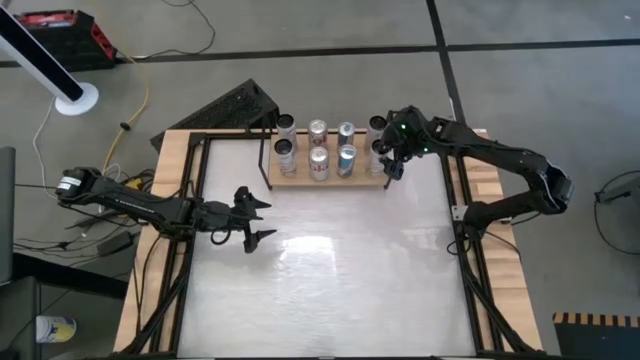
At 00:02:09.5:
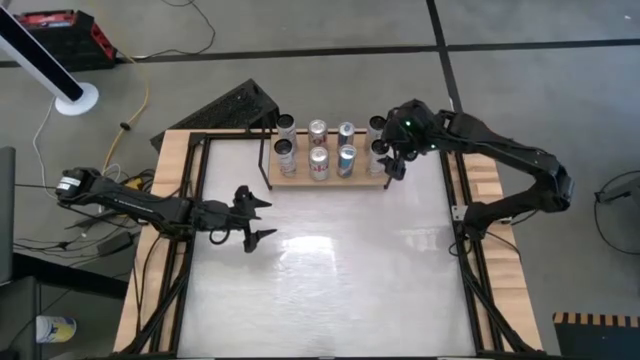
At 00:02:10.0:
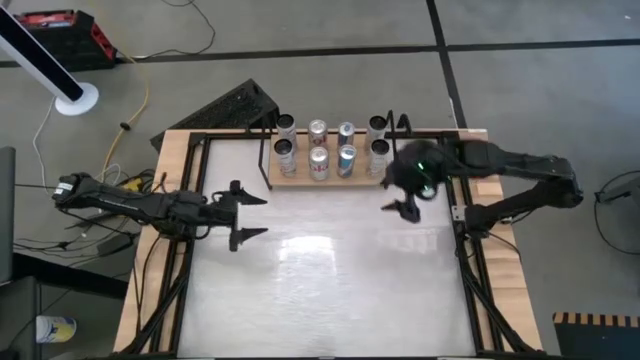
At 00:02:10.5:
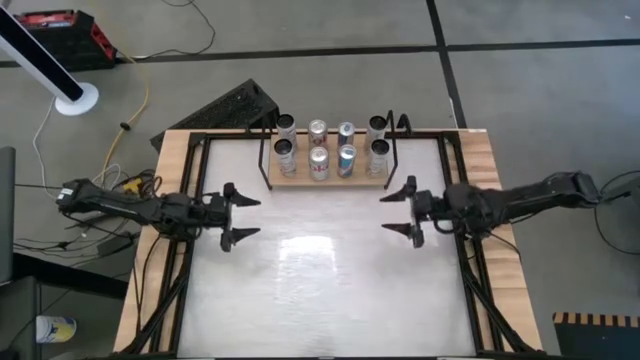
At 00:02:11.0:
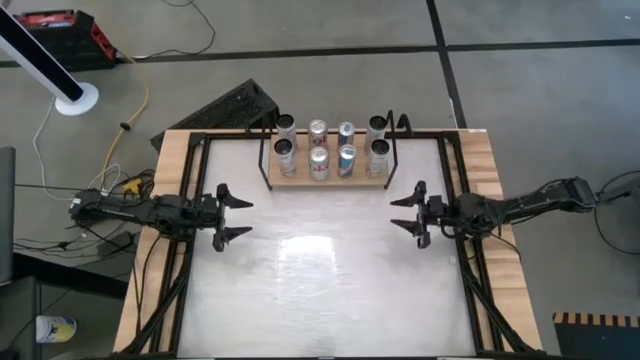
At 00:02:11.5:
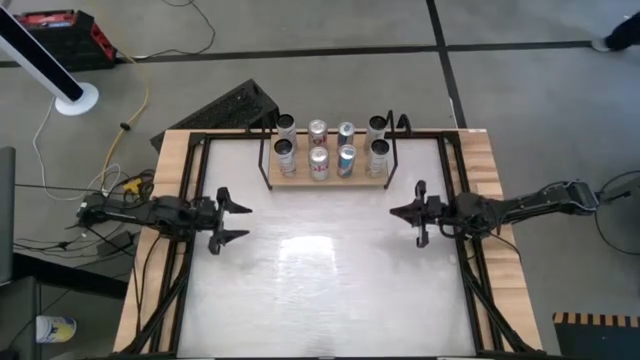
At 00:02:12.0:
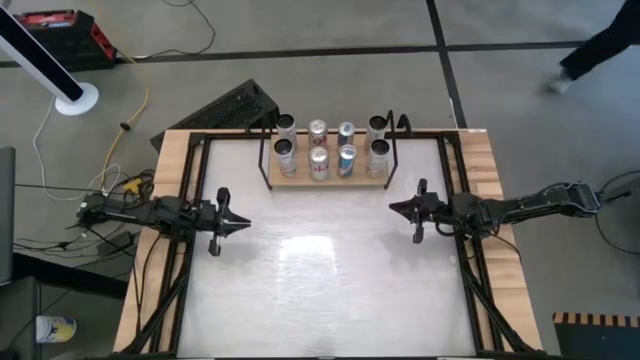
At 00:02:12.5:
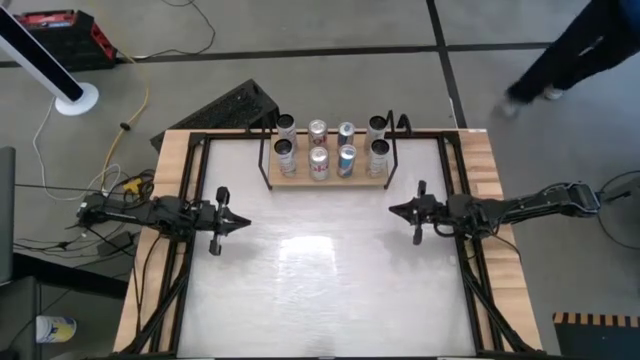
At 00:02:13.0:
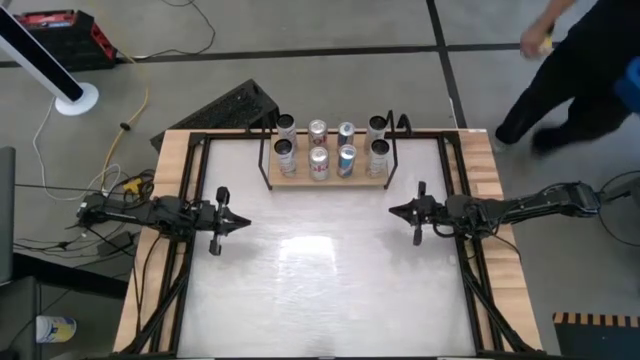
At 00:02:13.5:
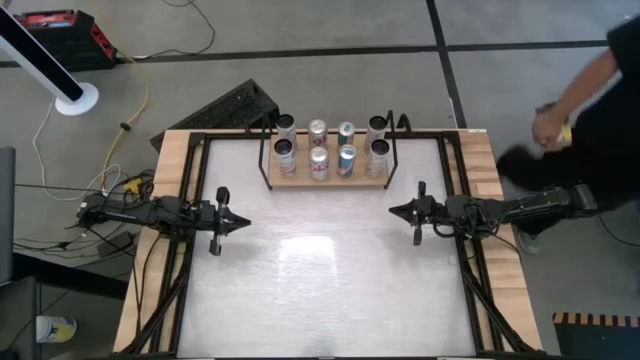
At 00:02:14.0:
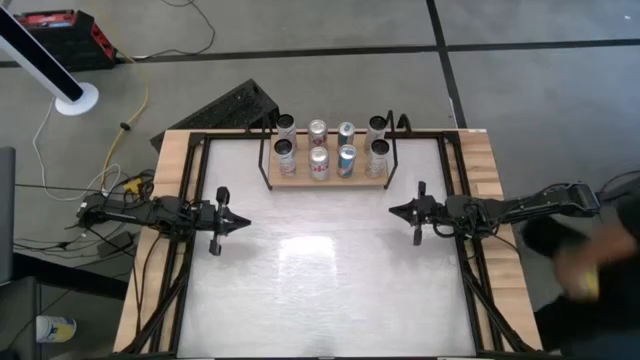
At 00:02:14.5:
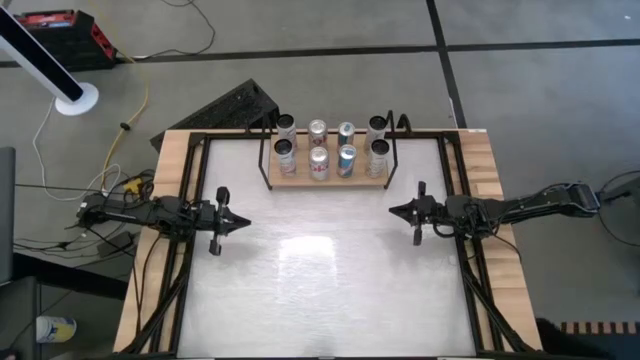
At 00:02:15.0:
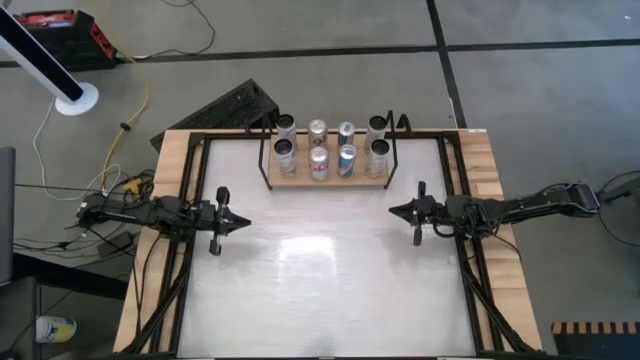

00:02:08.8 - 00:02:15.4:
Task: Place canned beverage on shelf
Return to Home Position

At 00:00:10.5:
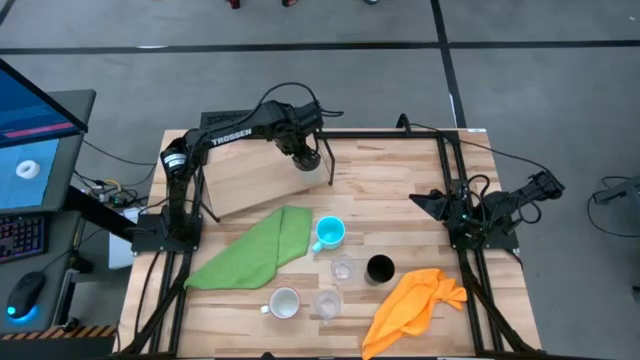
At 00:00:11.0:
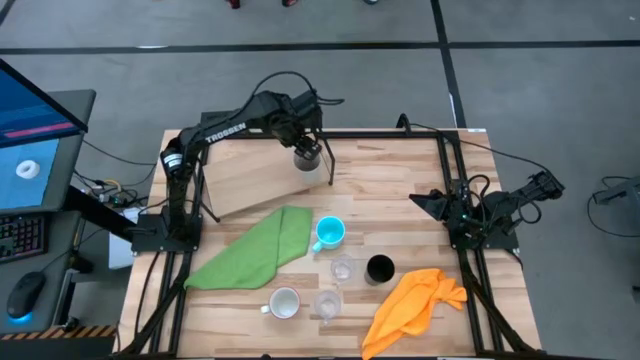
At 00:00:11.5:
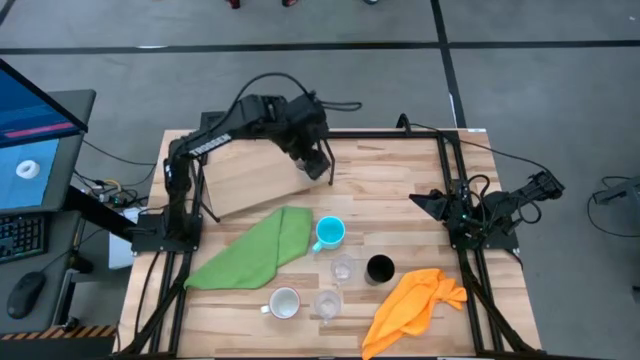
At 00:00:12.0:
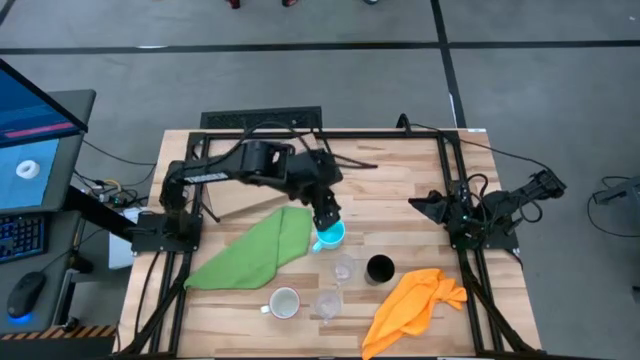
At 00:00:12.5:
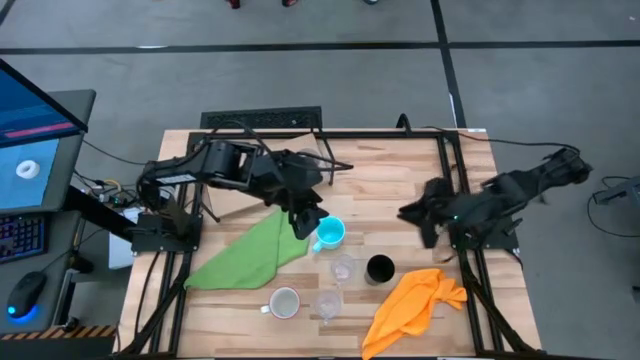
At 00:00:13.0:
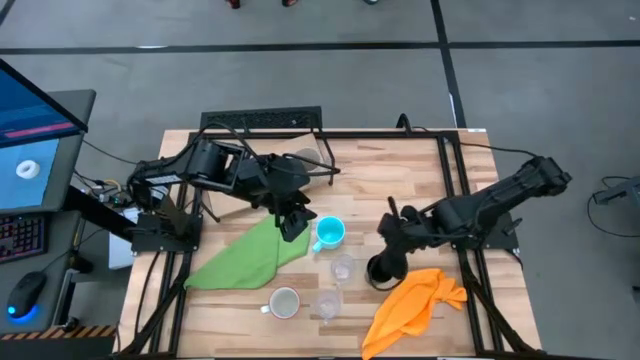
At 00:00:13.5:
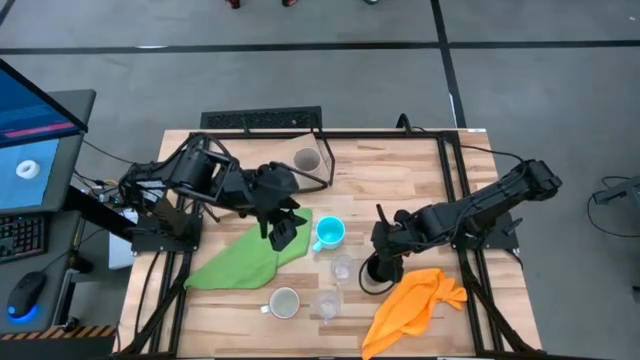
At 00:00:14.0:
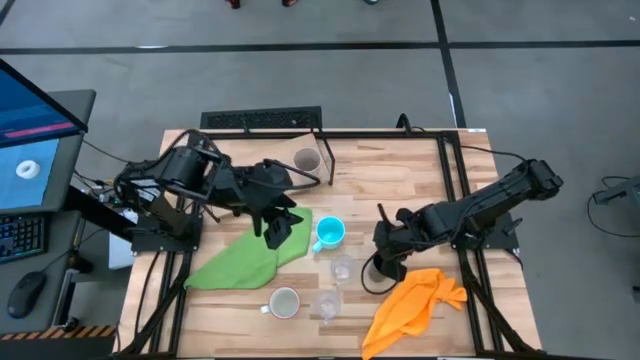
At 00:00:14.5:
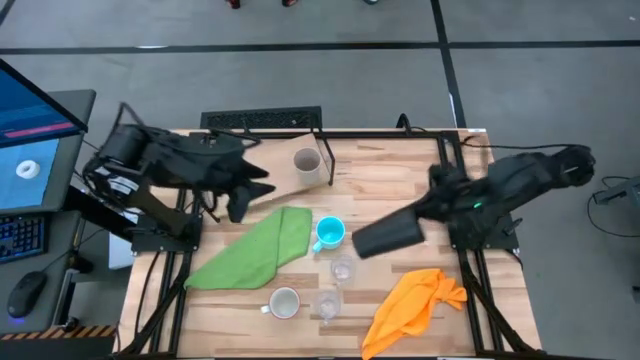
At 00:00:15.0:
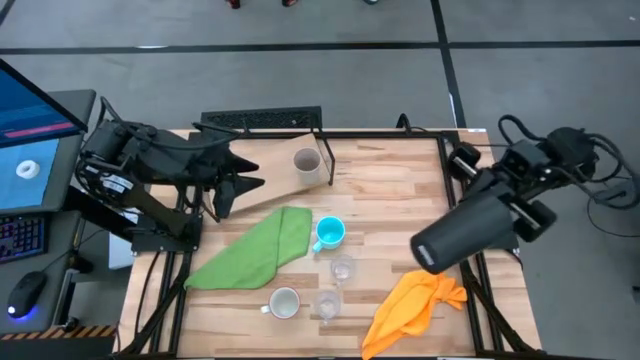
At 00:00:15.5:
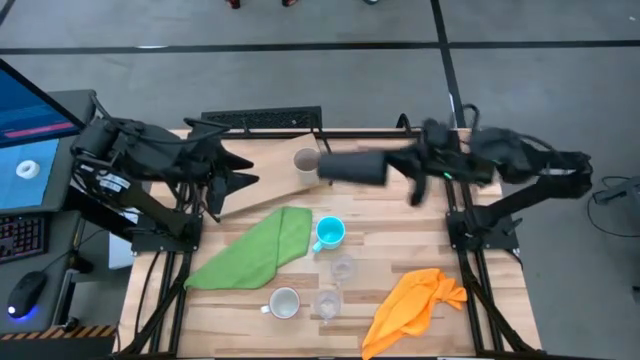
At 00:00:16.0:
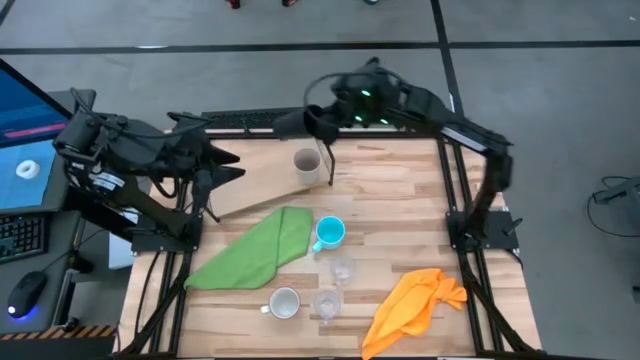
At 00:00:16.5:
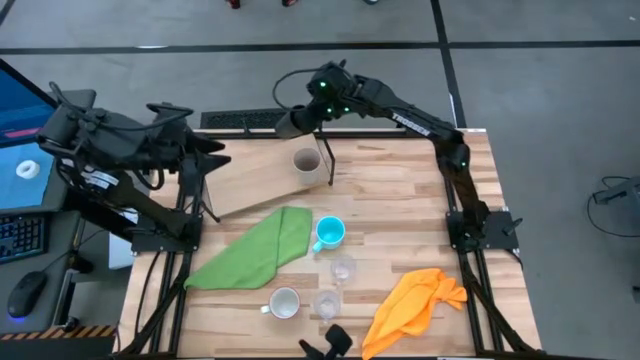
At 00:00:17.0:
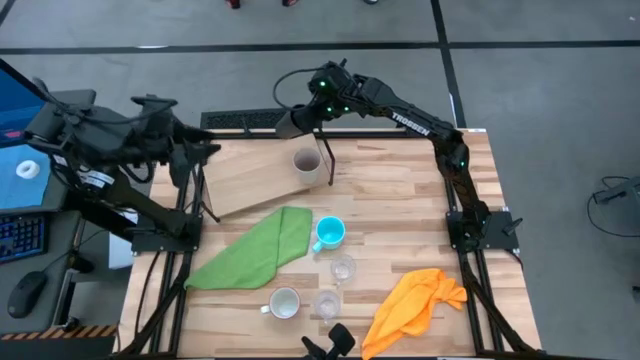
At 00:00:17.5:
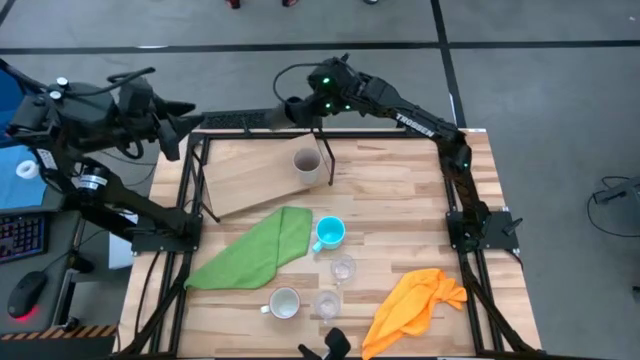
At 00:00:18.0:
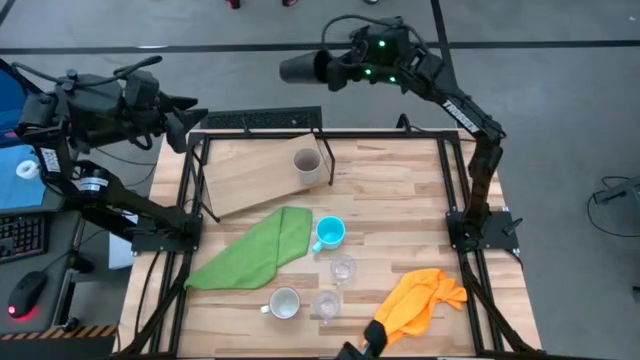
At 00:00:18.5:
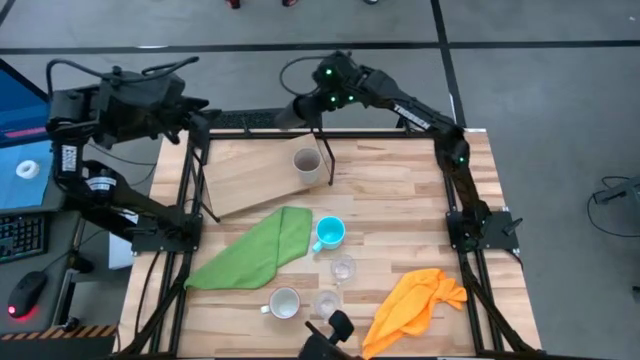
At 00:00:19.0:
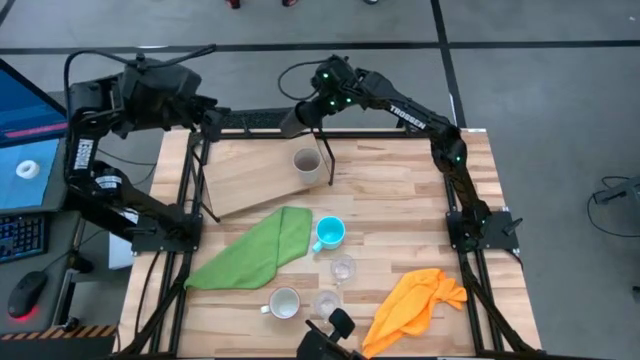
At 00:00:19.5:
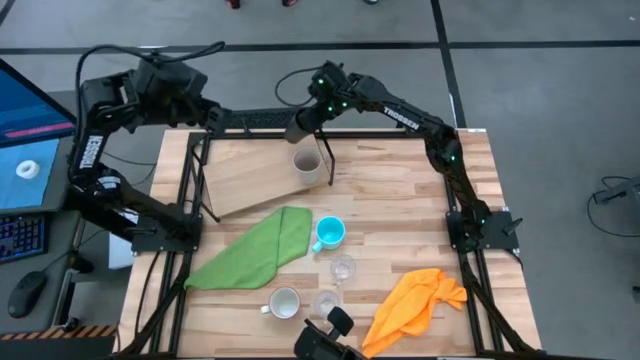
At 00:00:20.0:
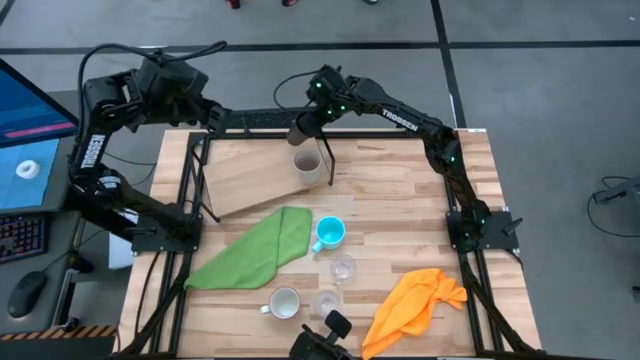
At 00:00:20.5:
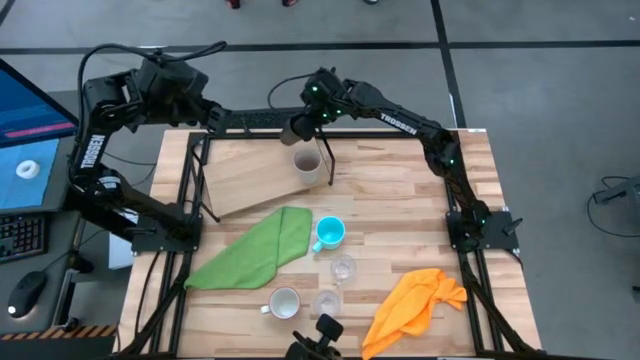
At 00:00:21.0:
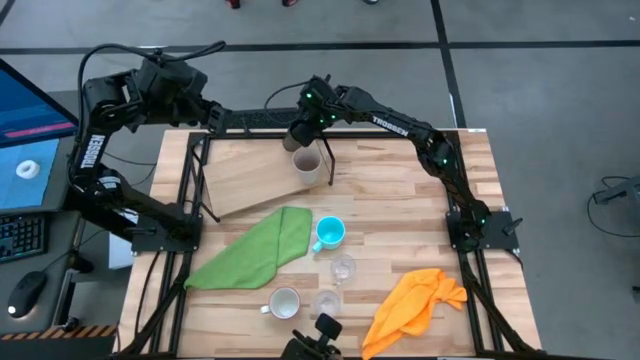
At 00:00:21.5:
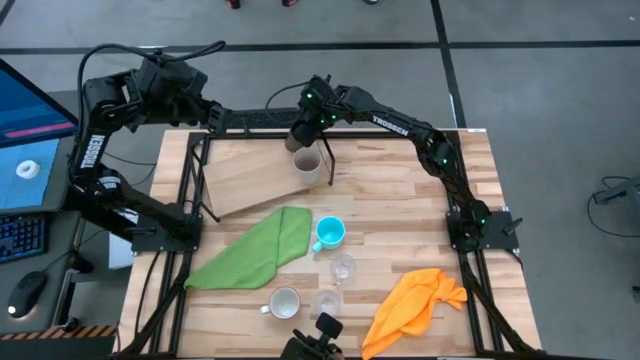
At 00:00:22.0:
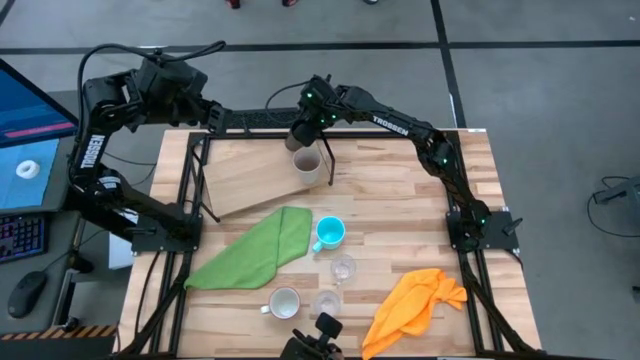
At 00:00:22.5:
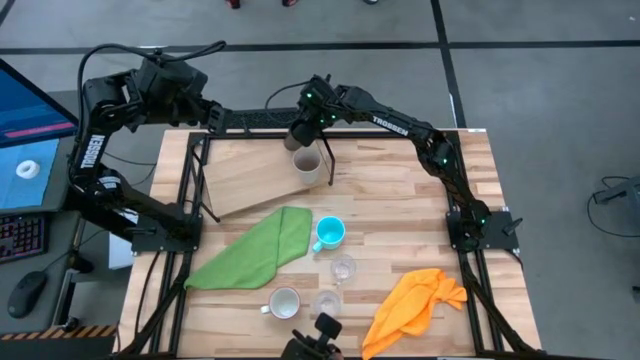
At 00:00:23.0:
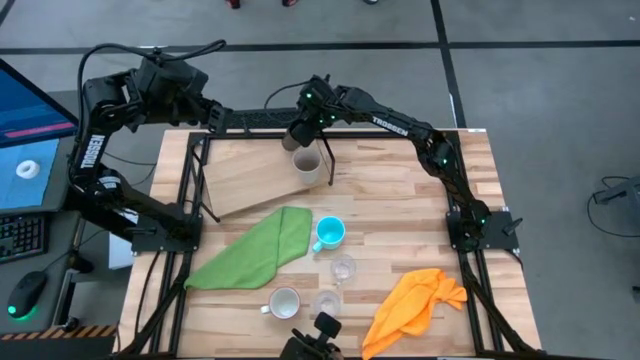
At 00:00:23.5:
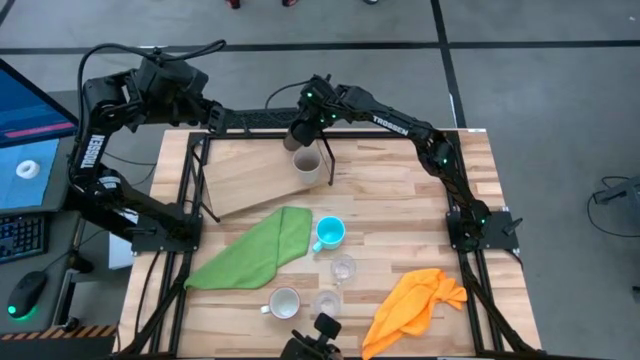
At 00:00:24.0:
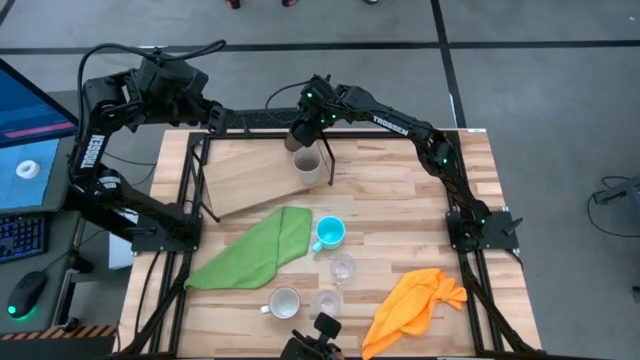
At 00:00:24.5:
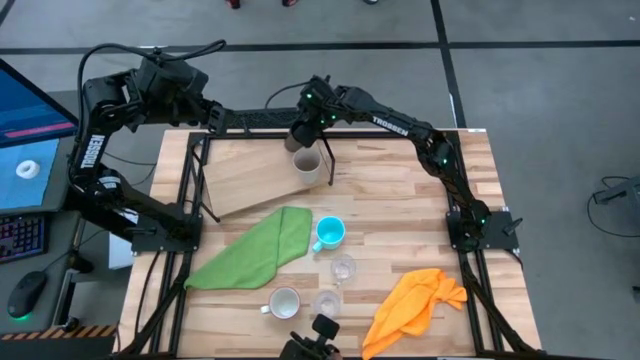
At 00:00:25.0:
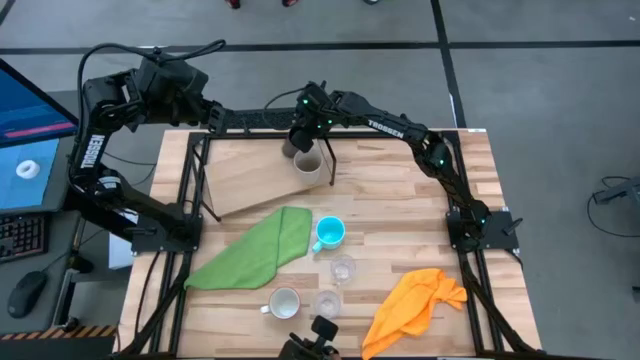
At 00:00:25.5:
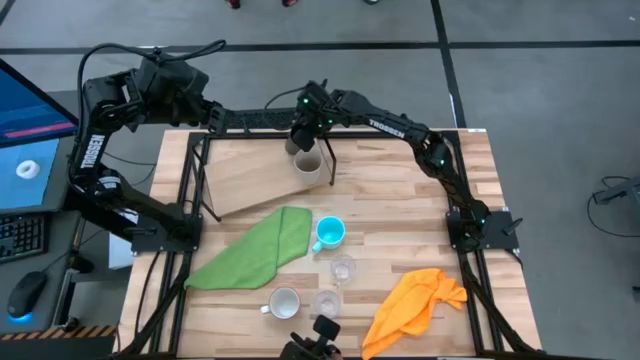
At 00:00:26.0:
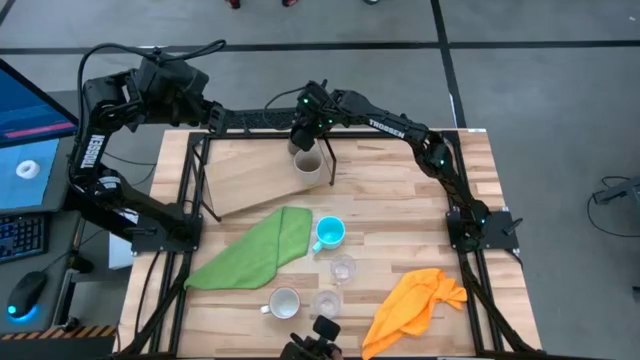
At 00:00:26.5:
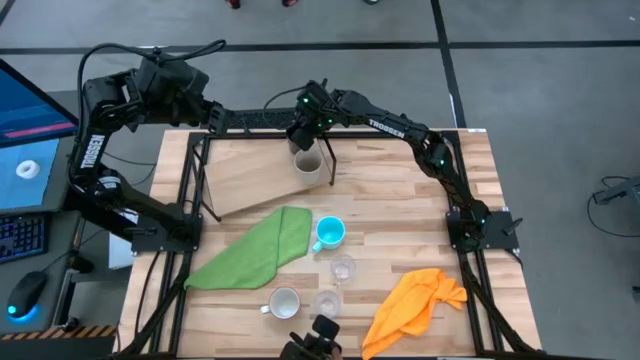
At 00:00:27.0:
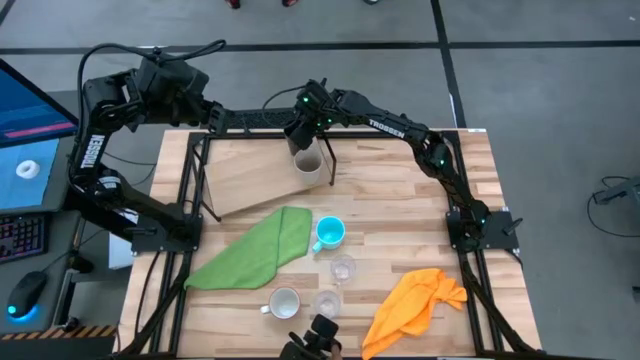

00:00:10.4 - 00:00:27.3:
Task: Stack small to large cups/mugs on shelf
Put the black cup on the shelf
